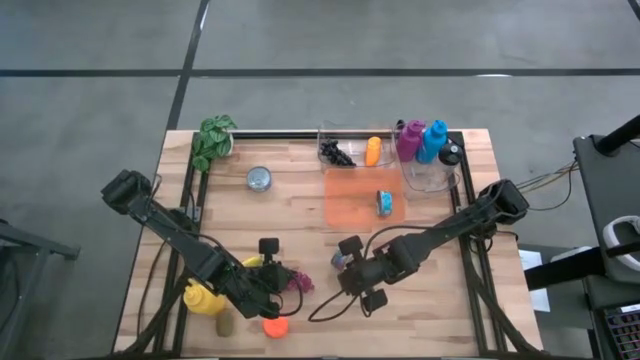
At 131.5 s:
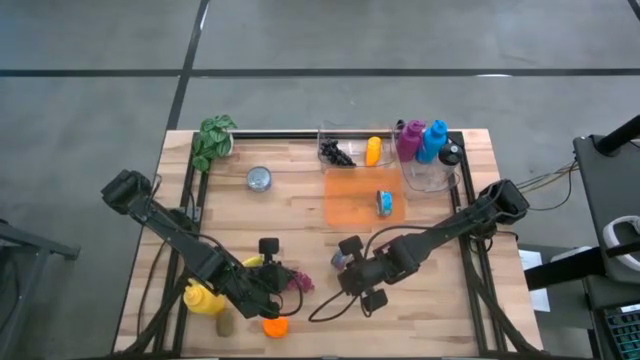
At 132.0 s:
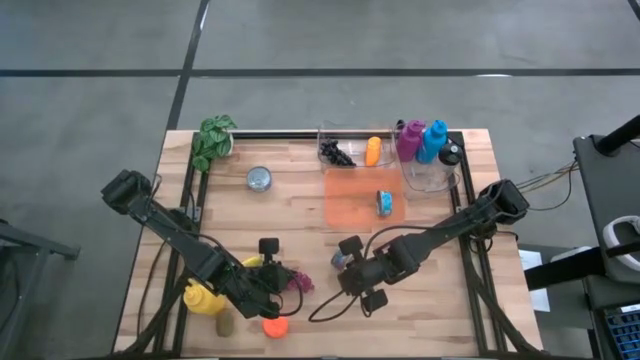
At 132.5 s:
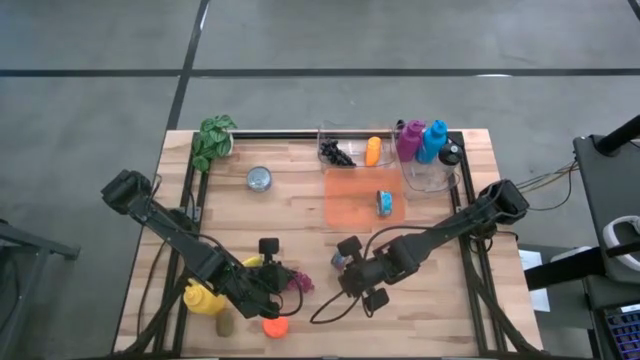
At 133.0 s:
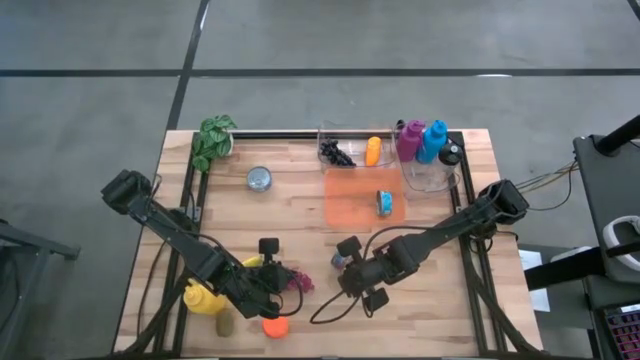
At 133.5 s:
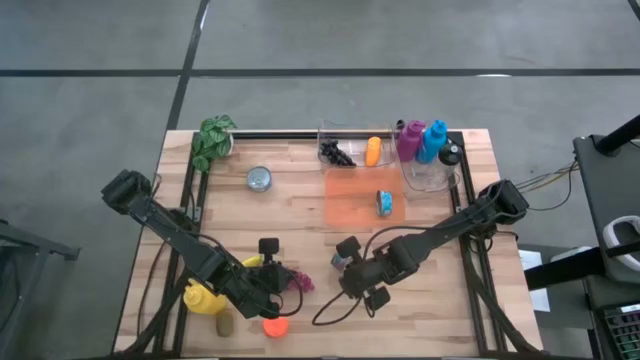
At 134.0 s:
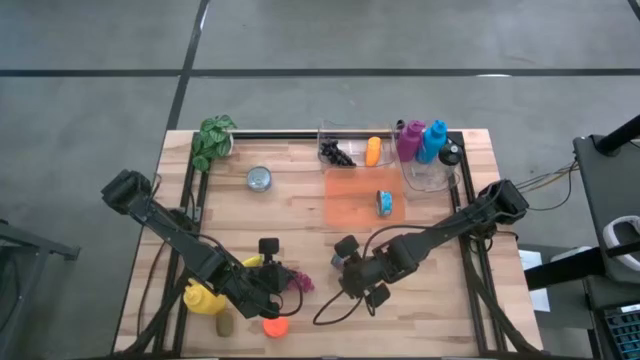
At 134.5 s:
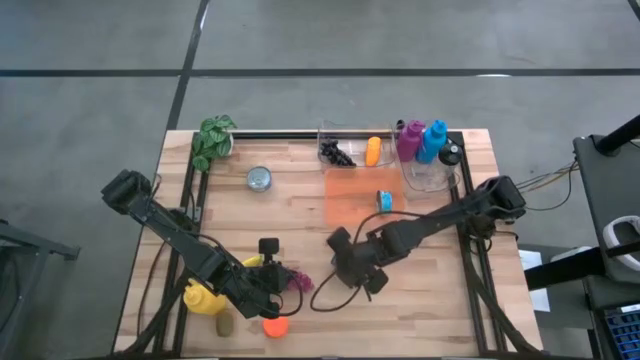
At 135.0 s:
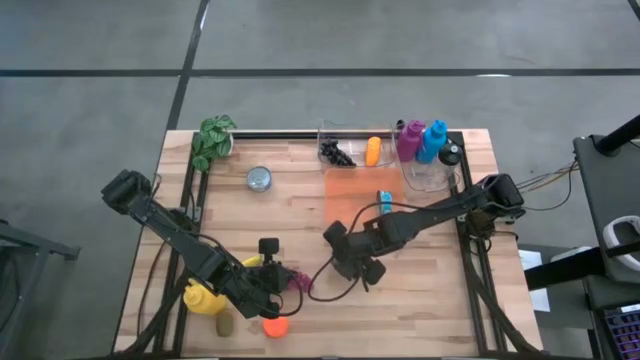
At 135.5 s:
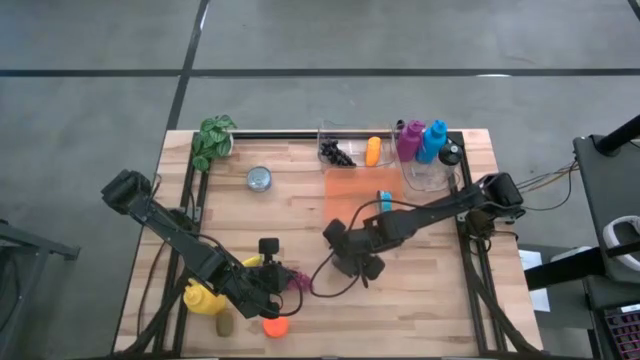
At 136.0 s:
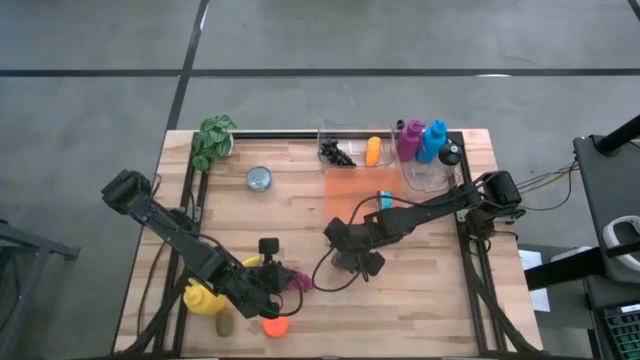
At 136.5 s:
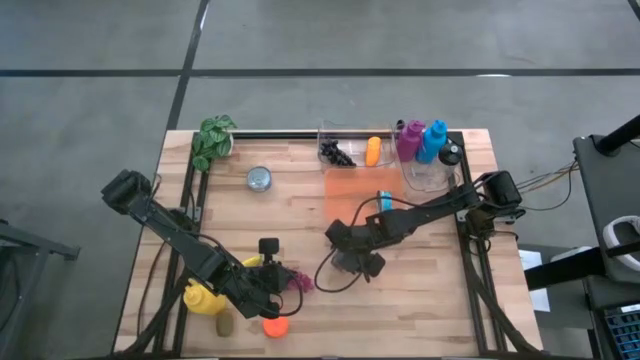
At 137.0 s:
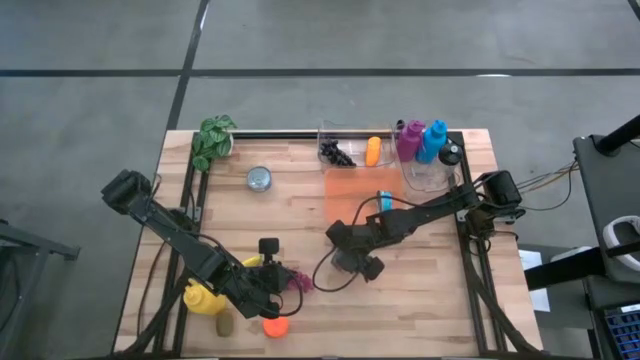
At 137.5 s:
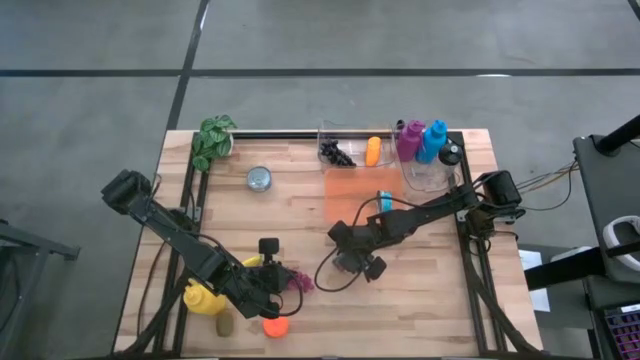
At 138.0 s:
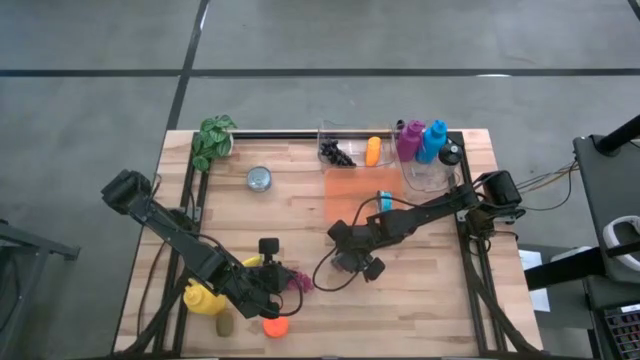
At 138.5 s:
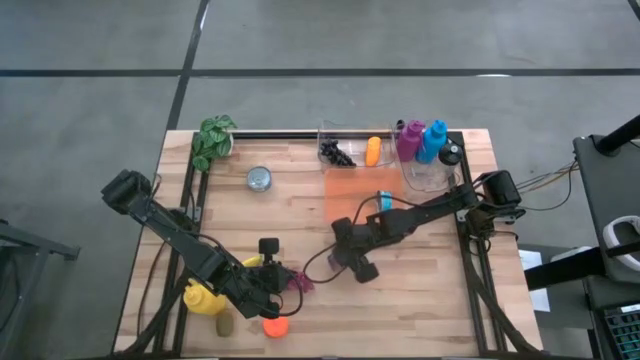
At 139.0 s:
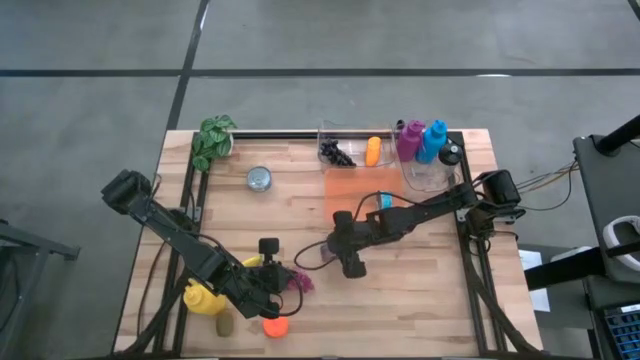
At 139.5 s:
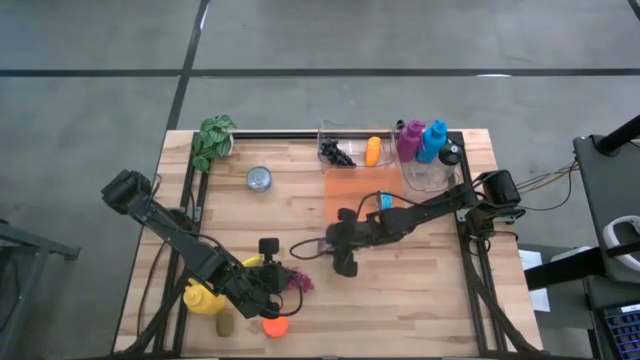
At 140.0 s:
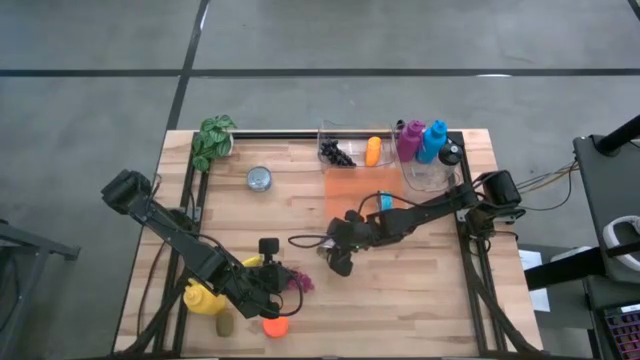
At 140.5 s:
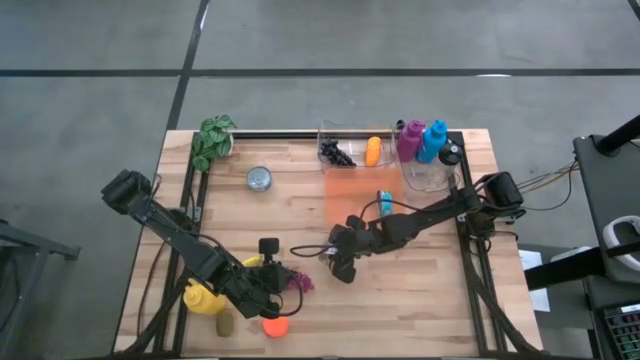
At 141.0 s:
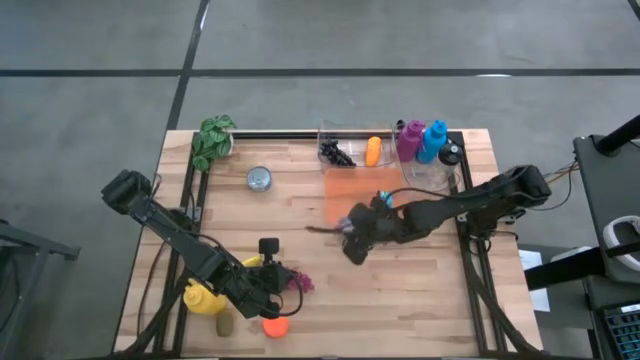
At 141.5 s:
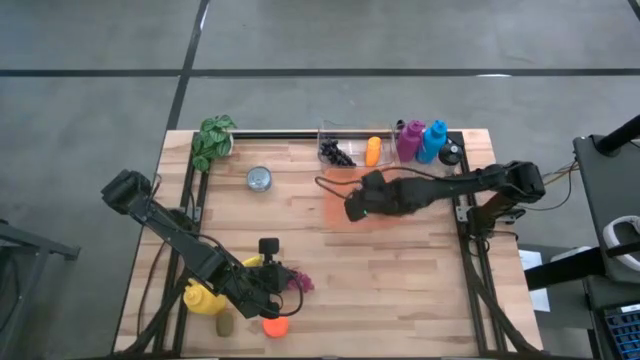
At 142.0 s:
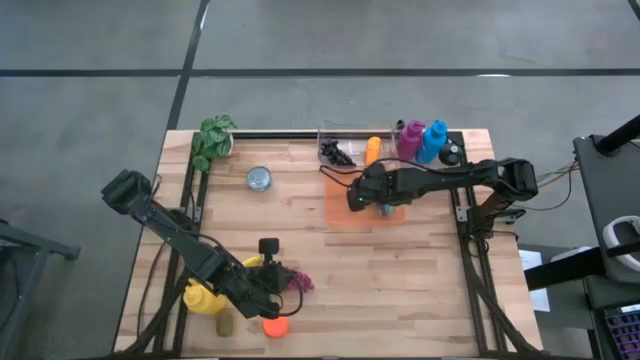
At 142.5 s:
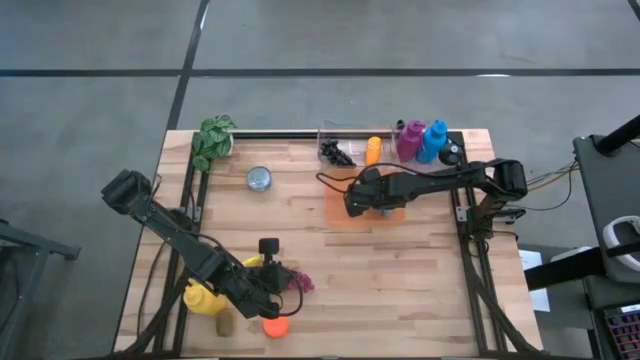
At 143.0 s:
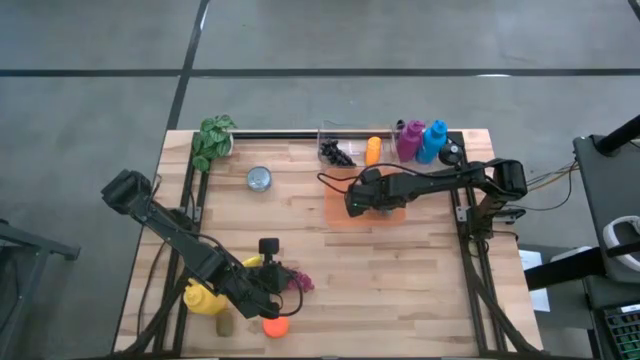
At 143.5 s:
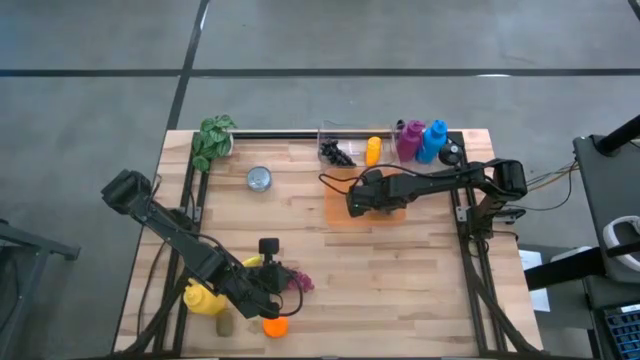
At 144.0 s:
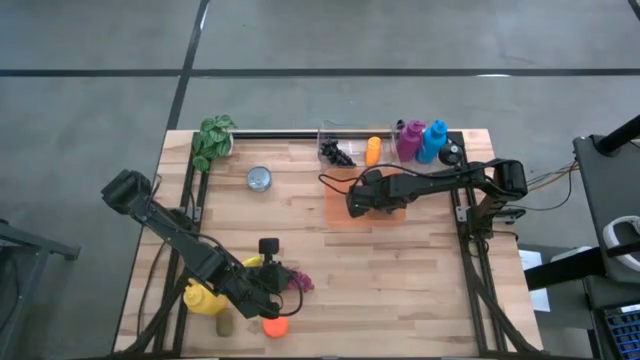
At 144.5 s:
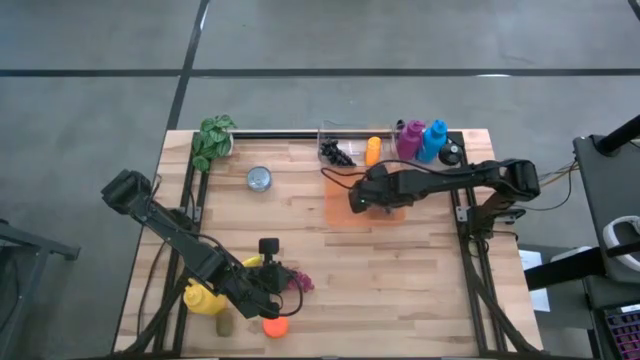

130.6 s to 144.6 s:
Task: Pick & Place Food Item
Put the blue and pink tuna can into the orange bin

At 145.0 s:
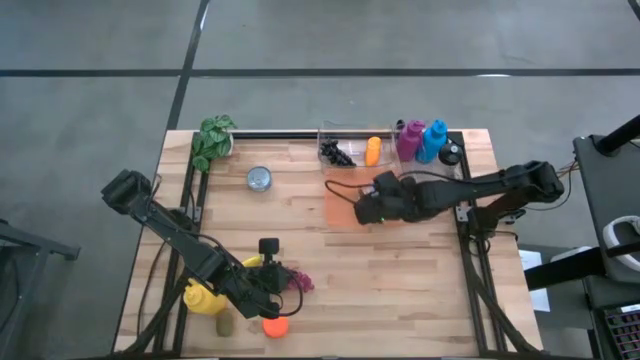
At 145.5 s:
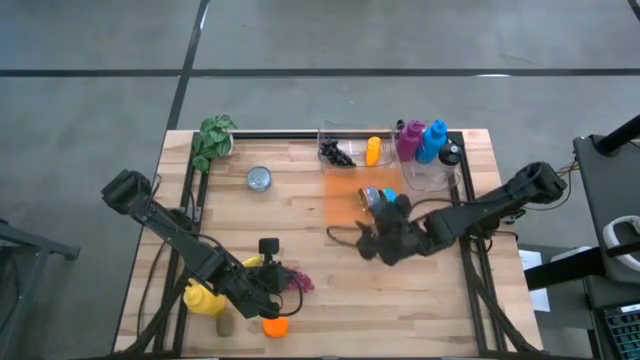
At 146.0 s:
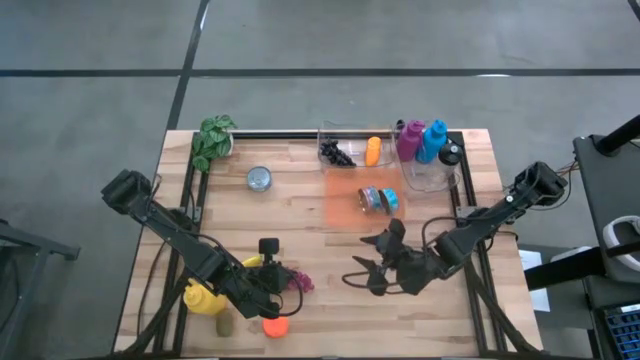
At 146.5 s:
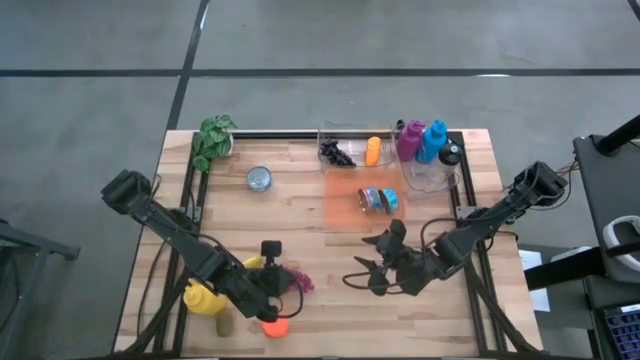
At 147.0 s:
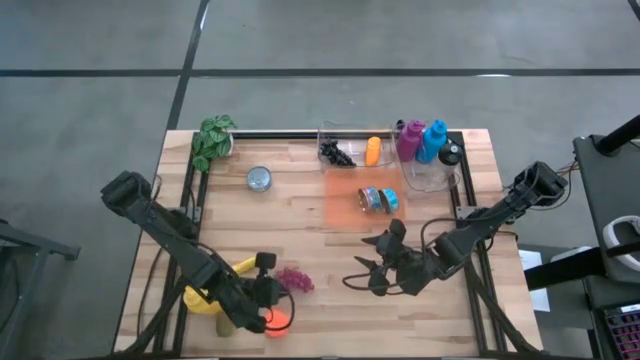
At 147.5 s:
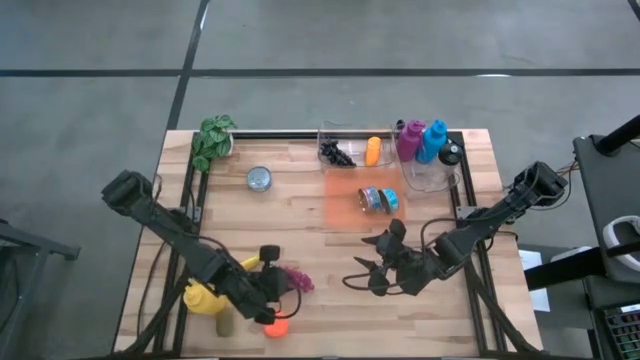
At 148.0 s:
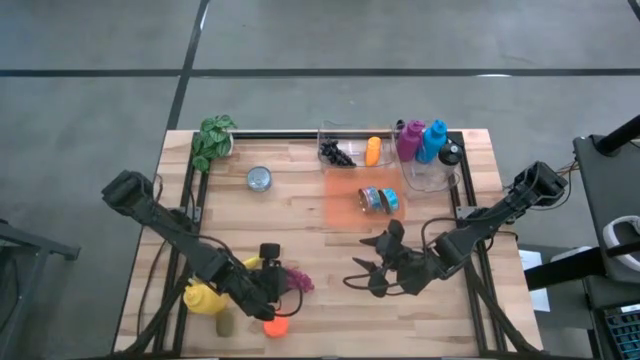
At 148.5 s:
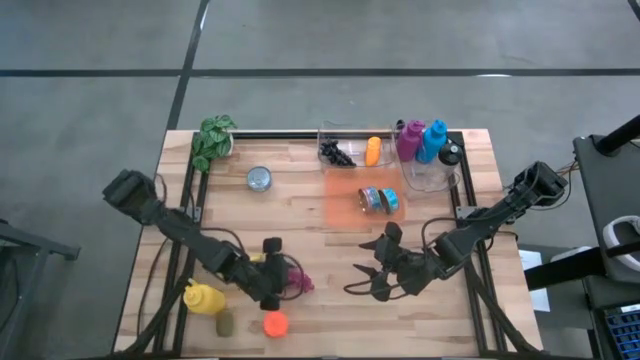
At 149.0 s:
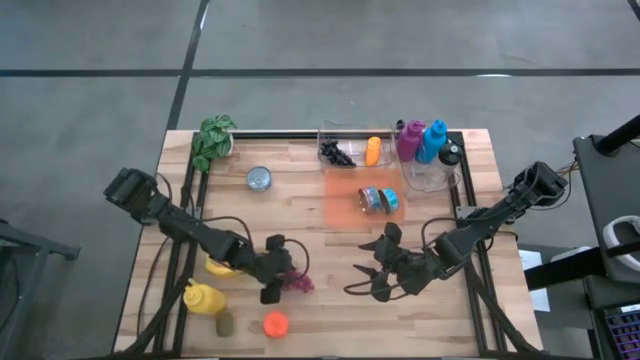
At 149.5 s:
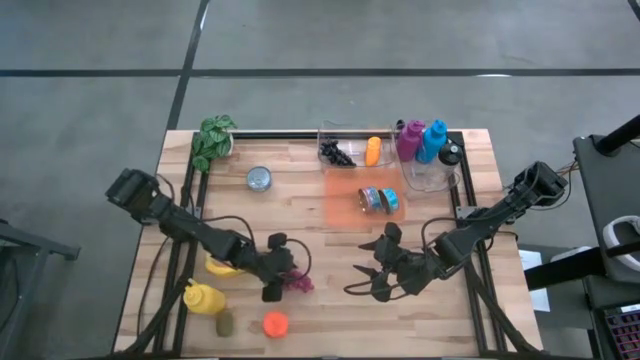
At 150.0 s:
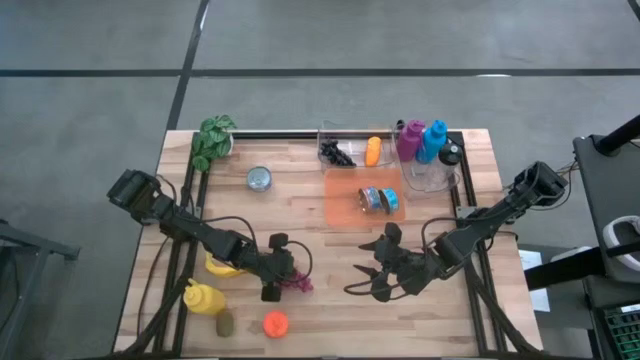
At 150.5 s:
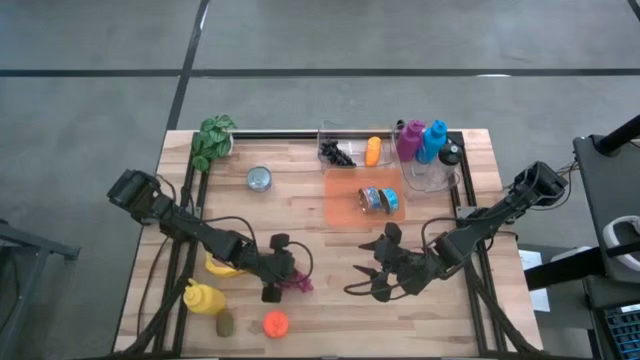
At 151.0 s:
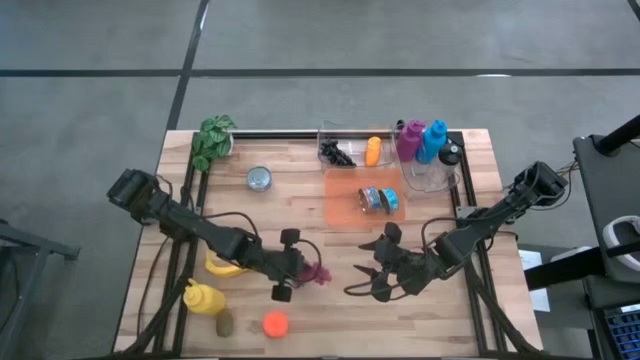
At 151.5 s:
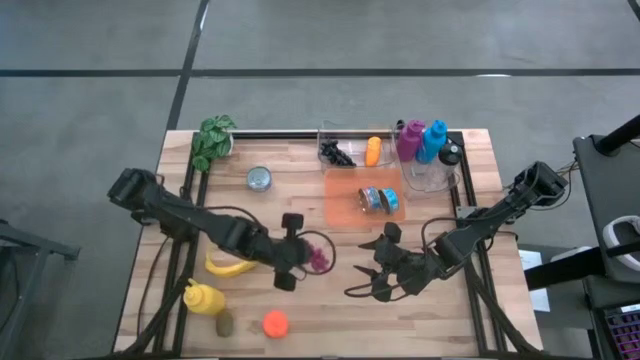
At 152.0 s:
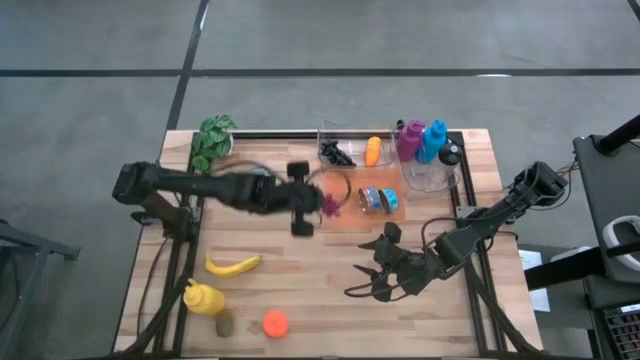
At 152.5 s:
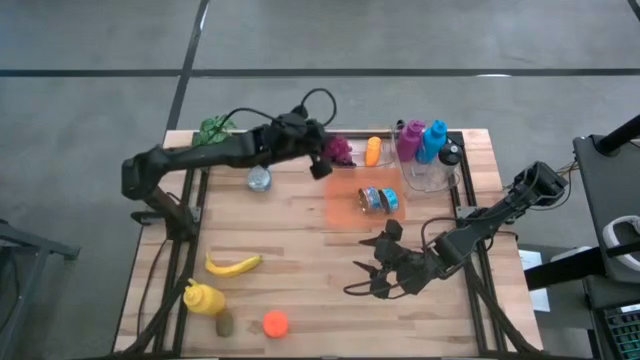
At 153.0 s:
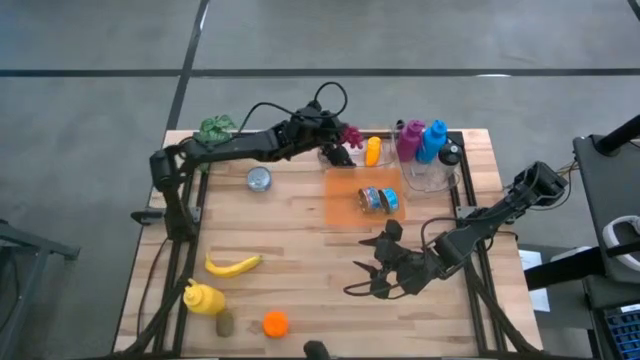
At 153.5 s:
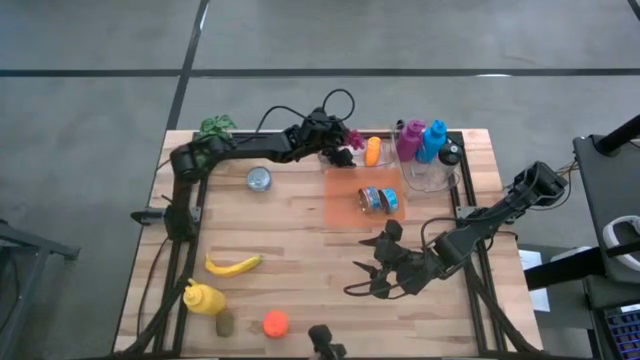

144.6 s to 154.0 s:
Put the violet grapes into the left transparent bin
